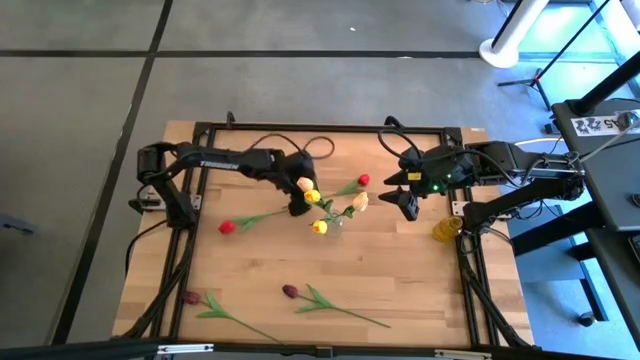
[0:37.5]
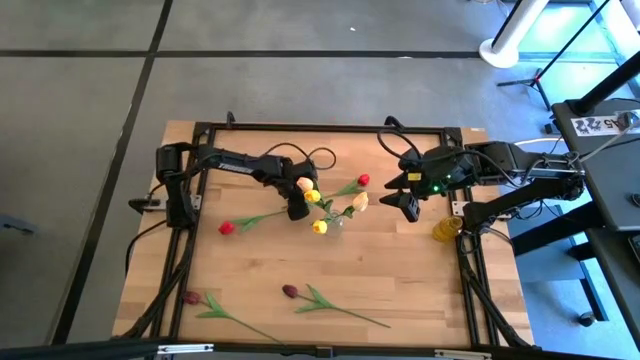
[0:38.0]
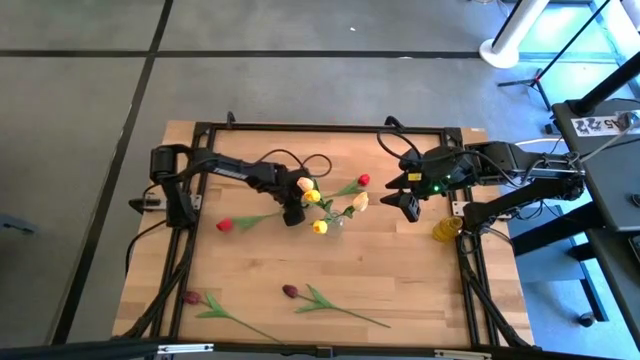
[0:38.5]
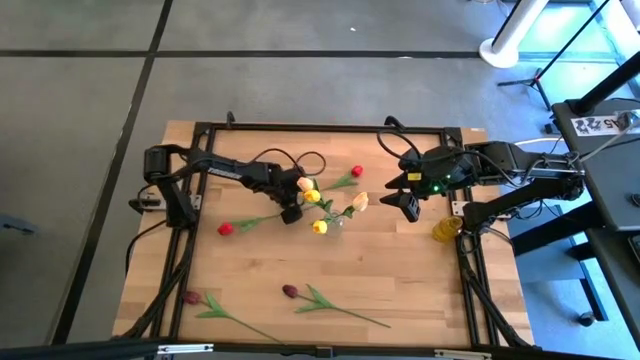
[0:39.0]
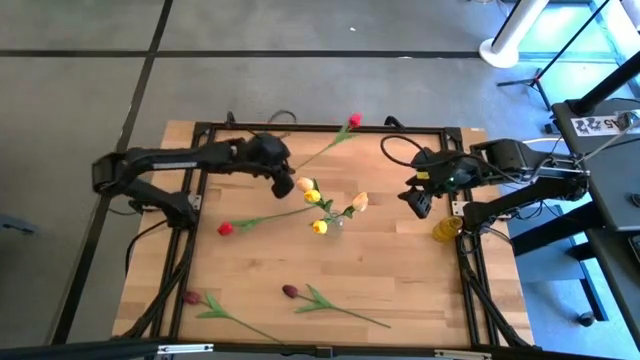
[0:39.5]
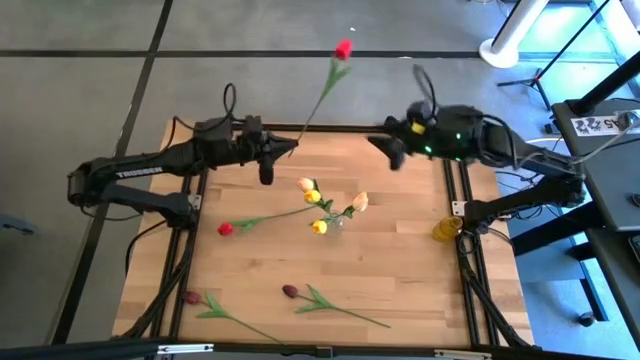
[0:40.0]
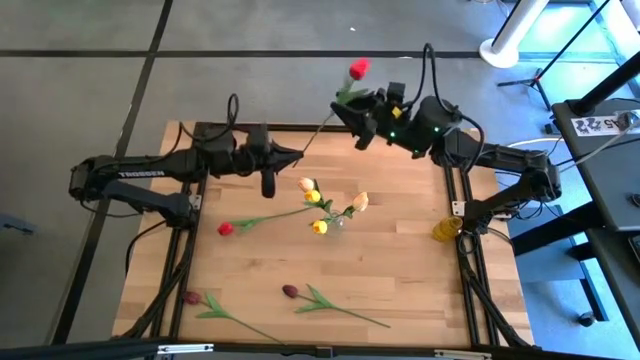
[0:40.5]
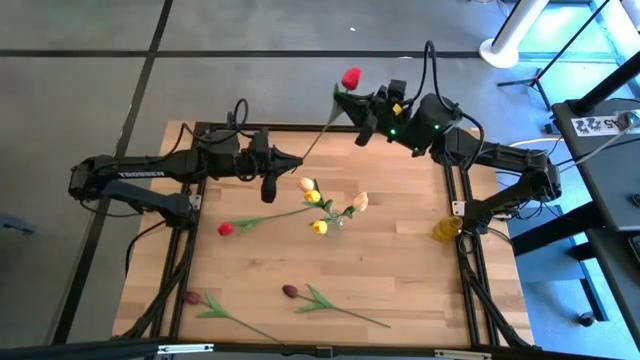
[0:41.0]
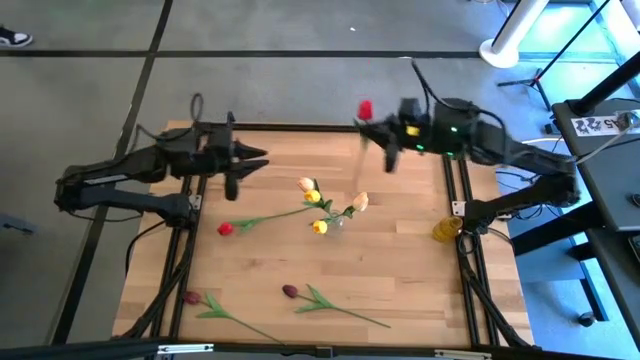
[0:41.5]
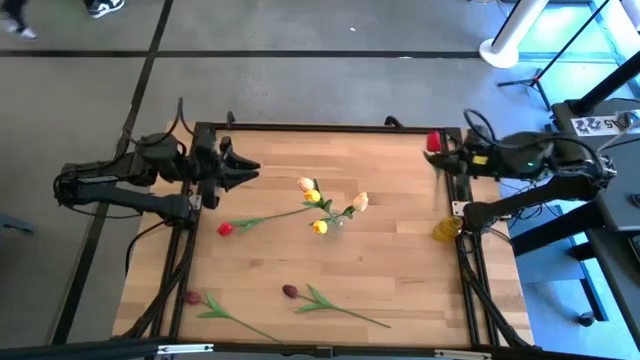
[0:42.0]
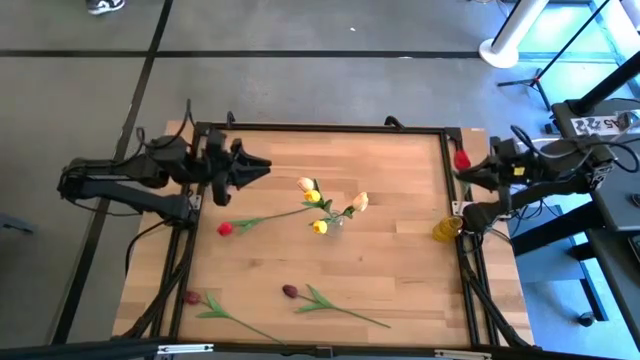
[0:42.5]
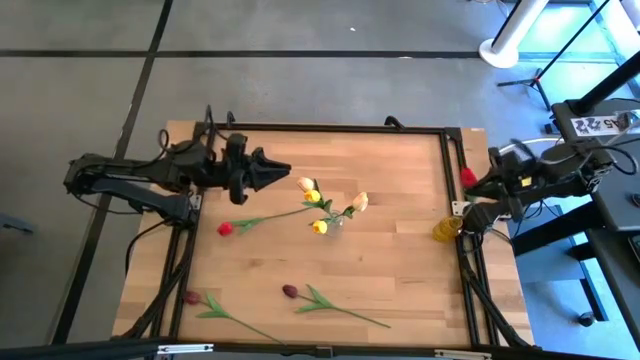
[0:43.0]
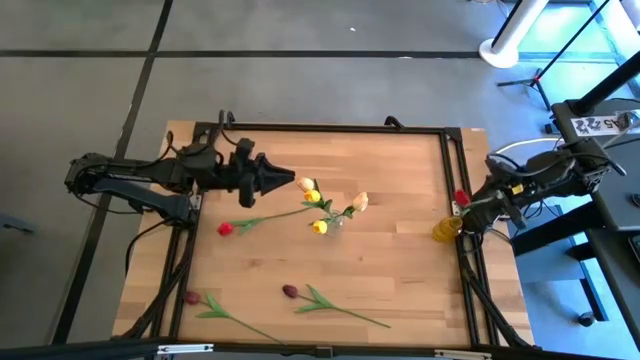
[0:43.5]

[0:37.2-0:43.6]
Task: Sort flowers into vase by color
Put the right red tulip into the yellow vase

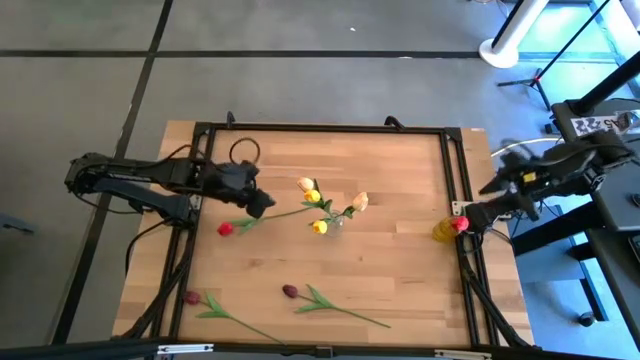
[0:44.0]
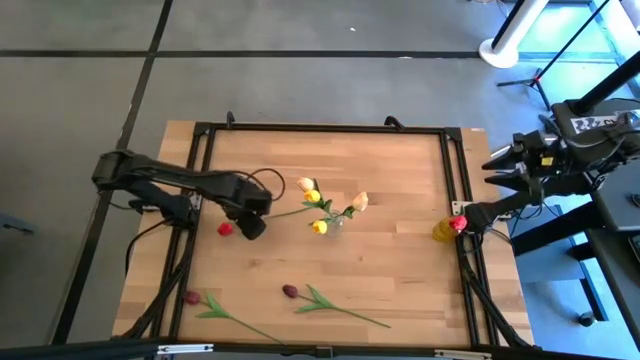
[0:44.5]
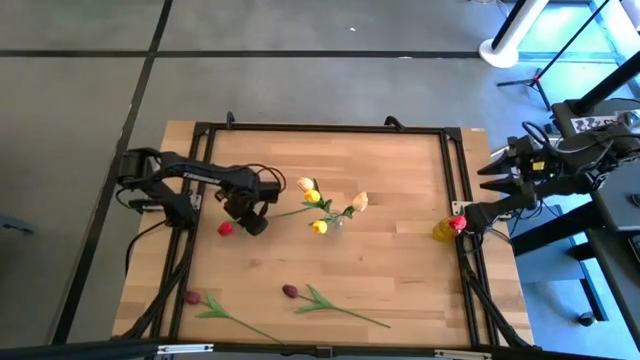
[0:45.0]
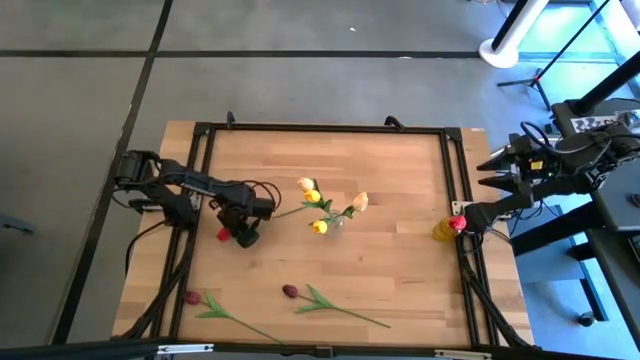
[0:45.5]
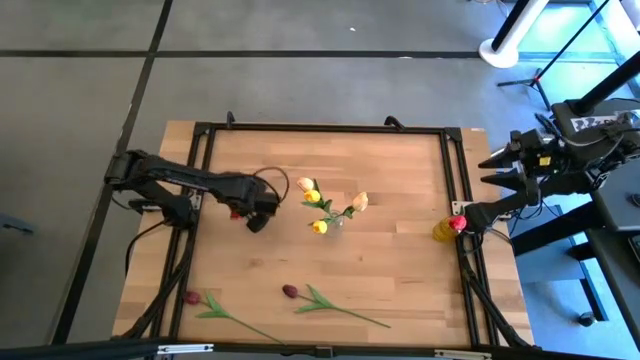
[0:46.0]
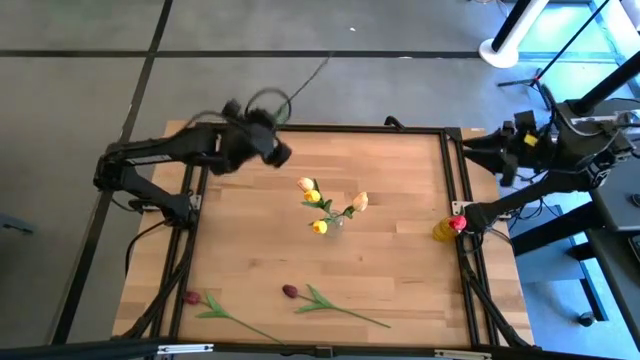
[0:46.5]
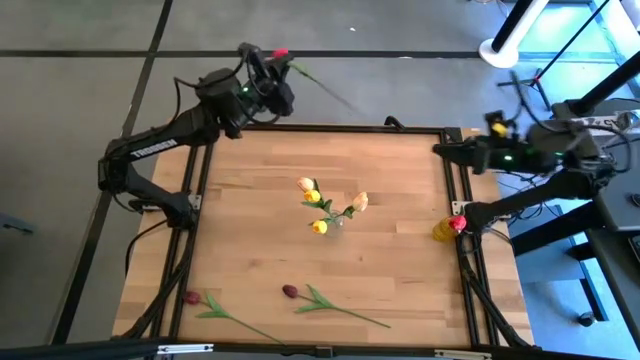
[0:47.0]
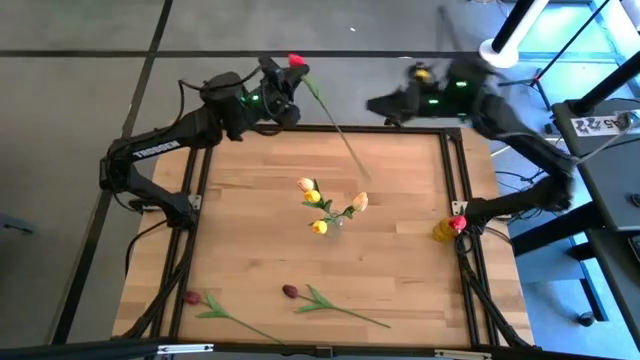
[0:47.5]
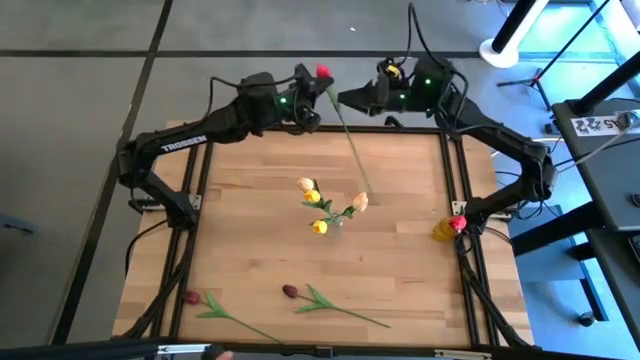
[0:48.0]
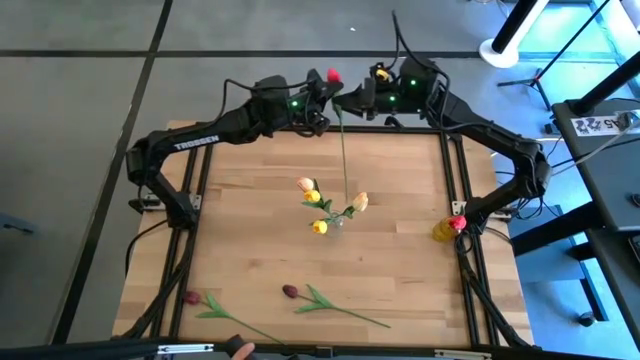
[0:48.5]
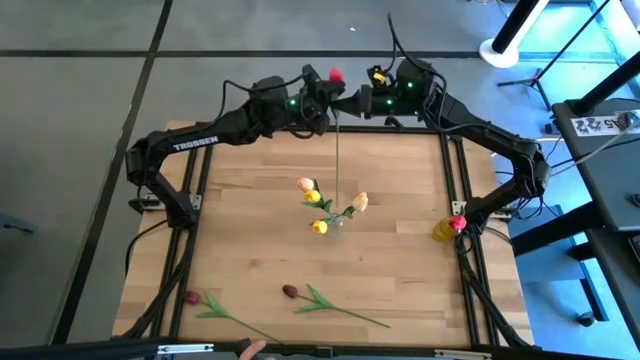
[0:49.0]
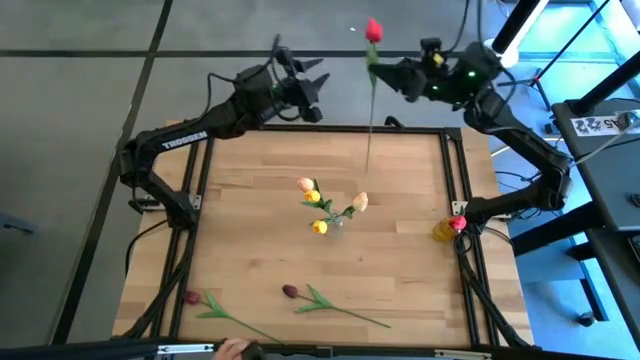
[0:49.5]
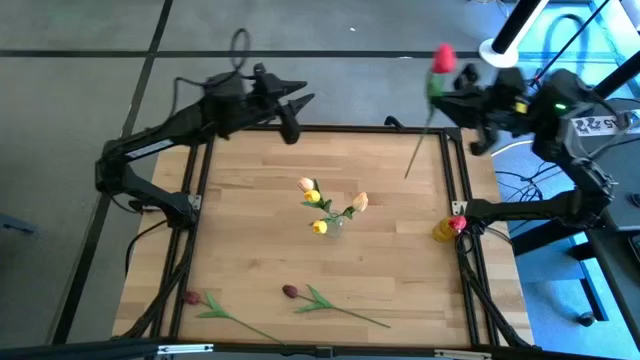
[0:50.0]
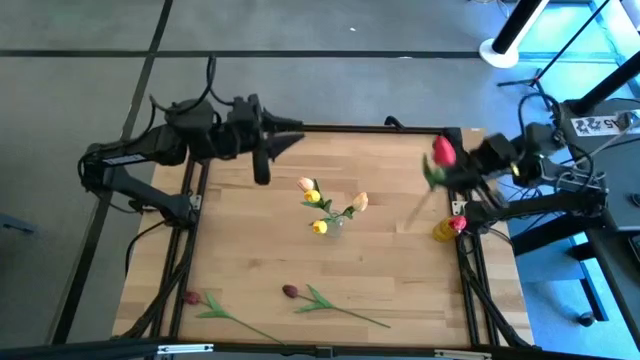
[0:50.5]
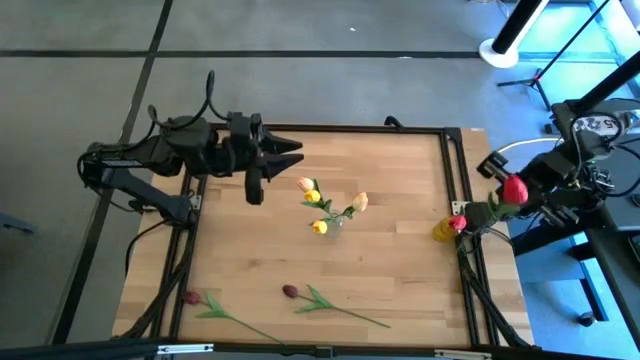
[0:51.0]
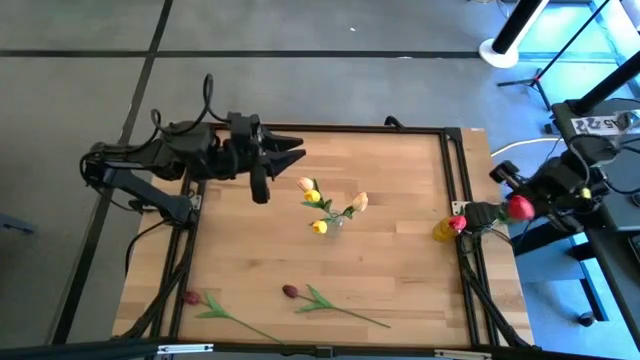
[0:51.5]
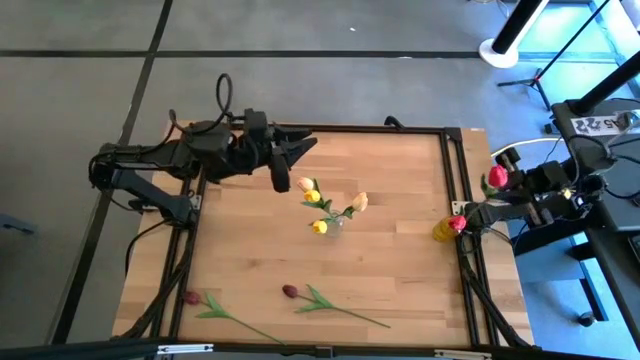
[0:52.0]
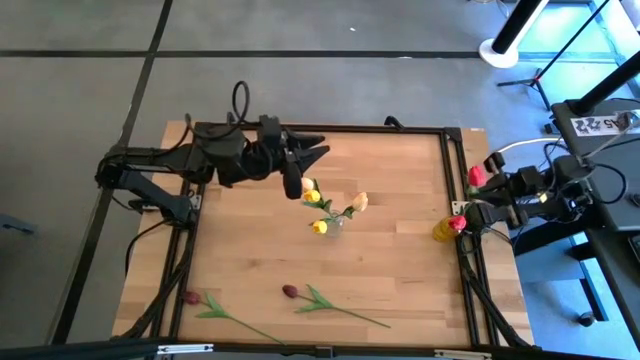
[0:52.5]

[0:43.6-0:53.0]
Put the red tulip into the yellow vase

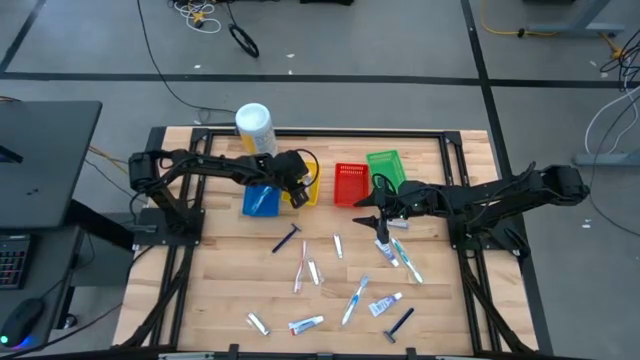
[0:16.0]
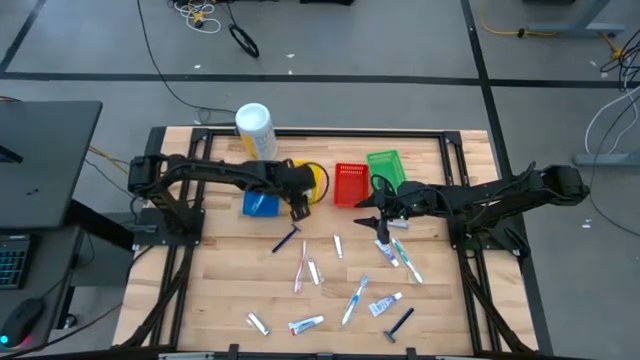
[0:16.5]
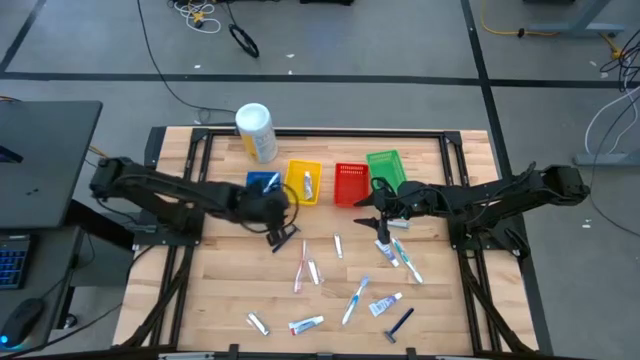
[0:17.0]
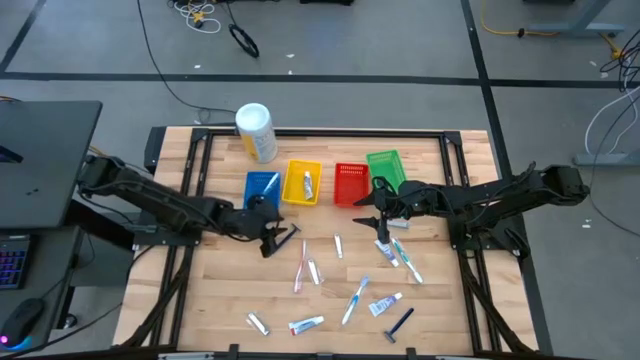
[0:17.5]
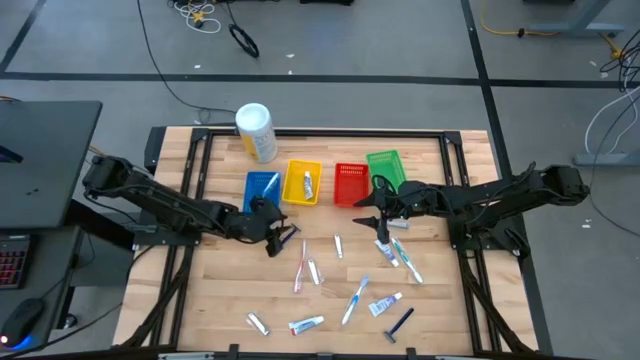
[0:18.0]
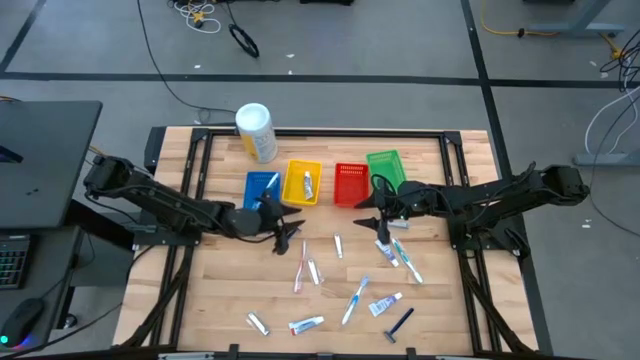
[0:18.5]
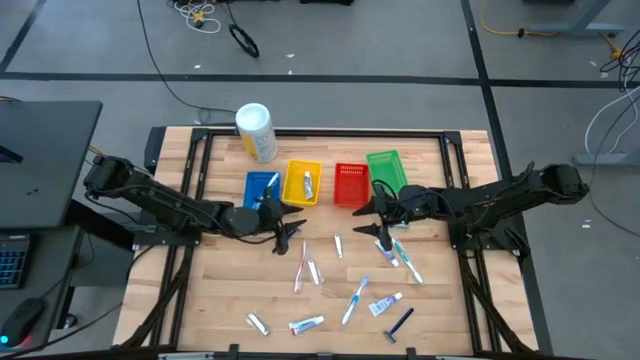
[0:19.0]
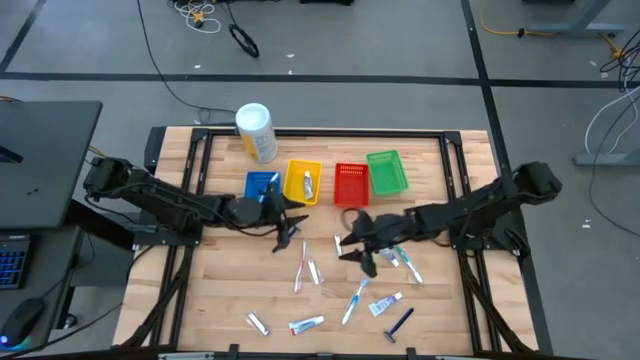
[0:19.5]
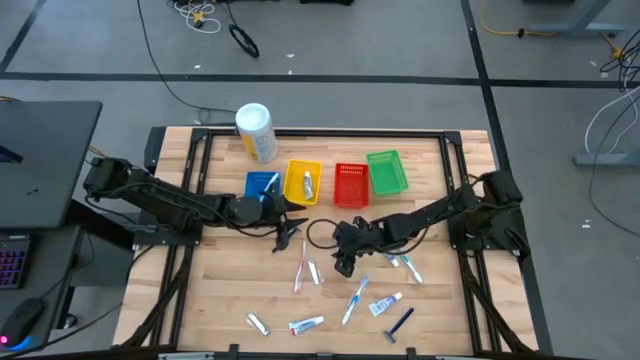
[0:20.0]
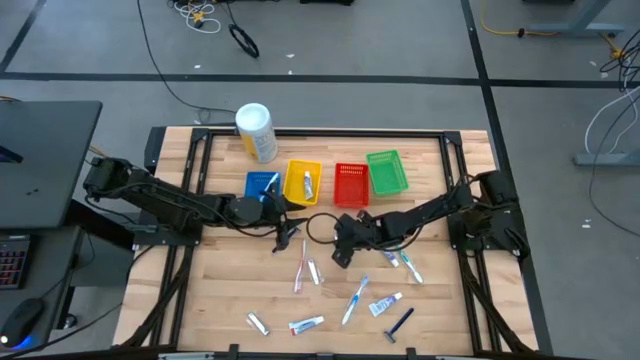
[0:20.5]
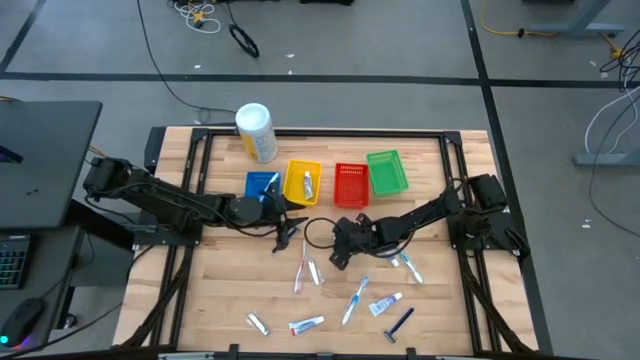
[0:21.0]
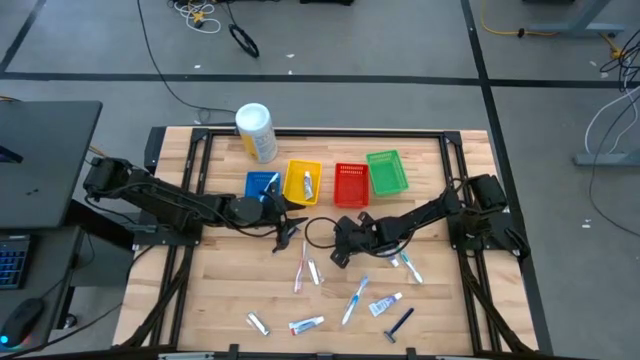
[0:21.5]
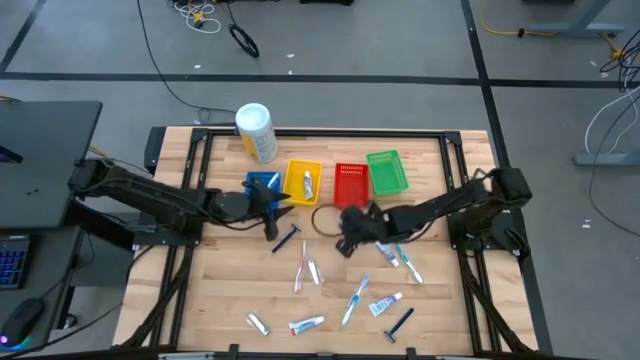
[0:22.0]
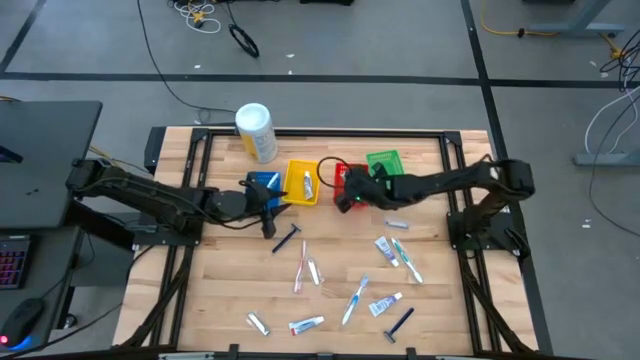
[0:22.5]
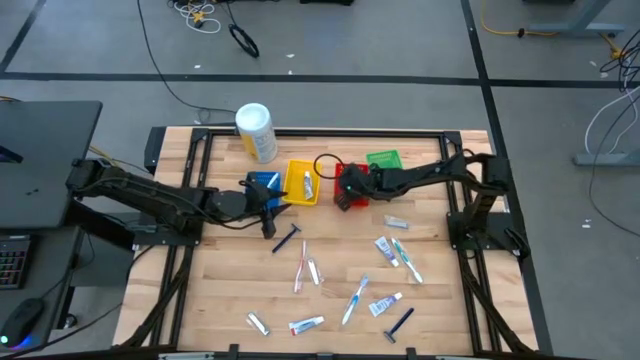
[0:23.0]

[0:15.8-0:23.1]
Task: Pick & Place Travel size toiletries
Put the silver nail cutter into the red bin
